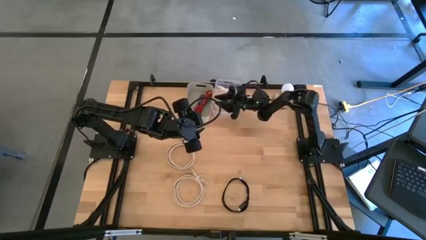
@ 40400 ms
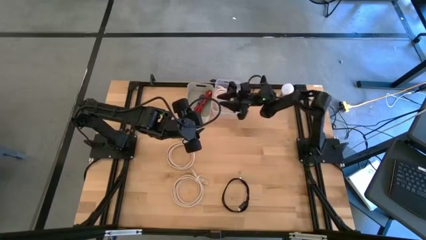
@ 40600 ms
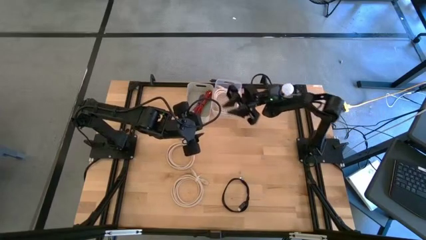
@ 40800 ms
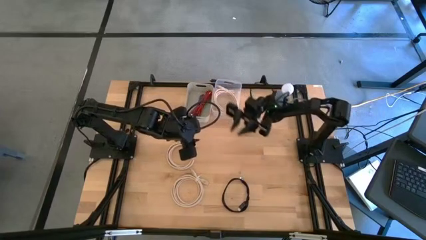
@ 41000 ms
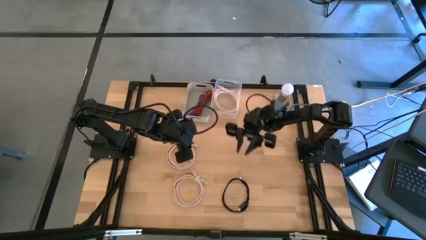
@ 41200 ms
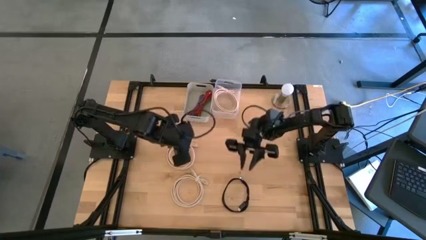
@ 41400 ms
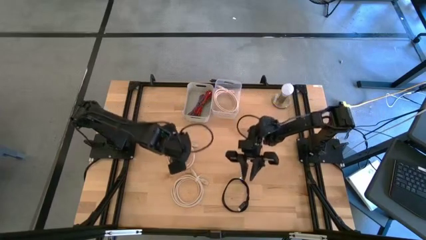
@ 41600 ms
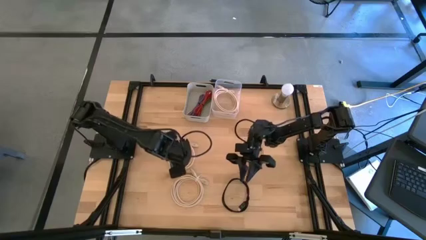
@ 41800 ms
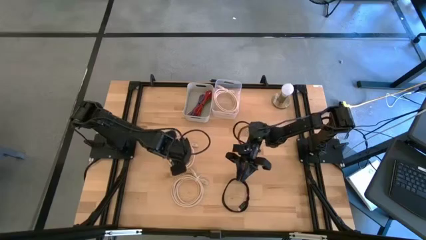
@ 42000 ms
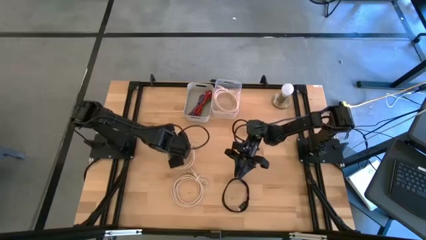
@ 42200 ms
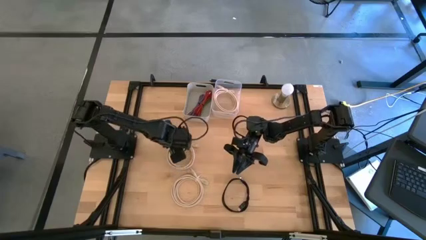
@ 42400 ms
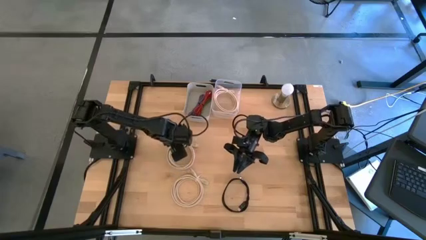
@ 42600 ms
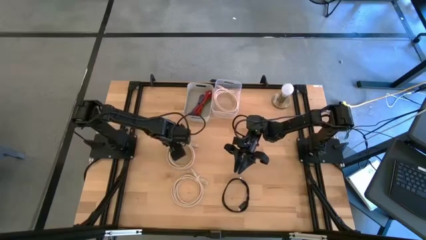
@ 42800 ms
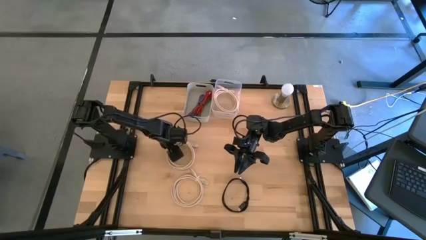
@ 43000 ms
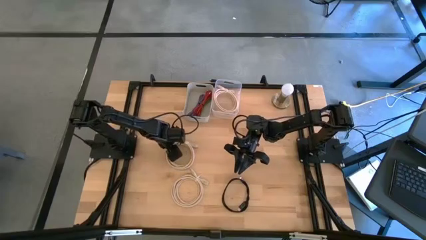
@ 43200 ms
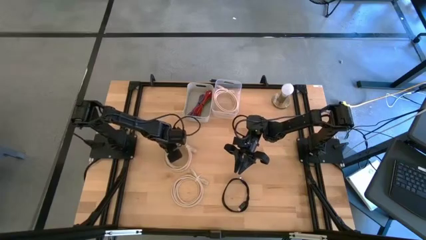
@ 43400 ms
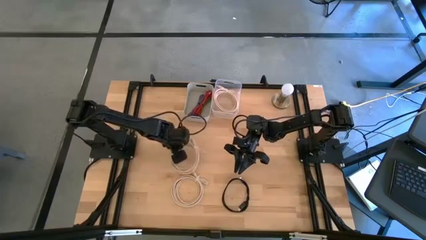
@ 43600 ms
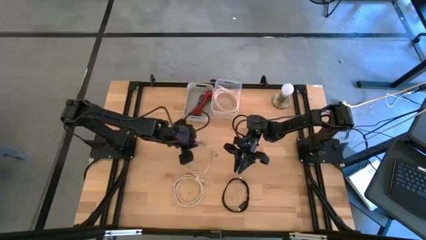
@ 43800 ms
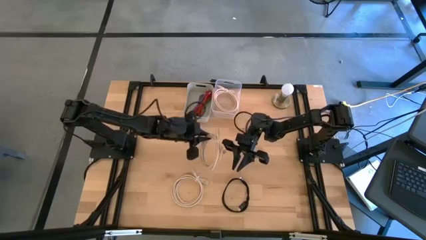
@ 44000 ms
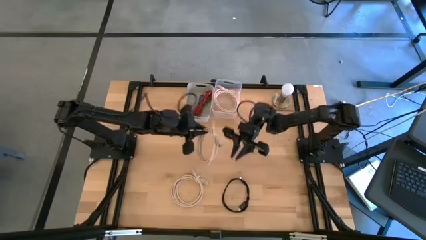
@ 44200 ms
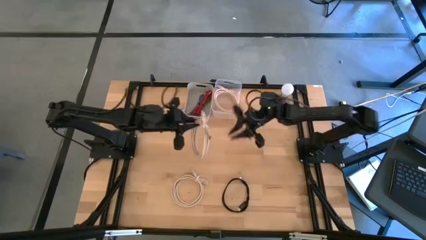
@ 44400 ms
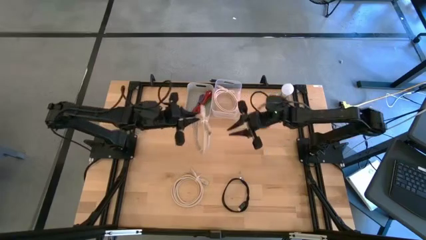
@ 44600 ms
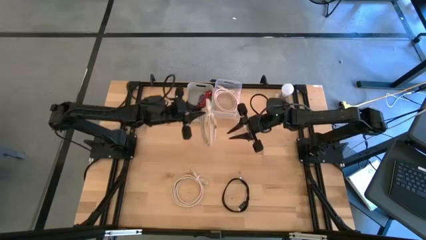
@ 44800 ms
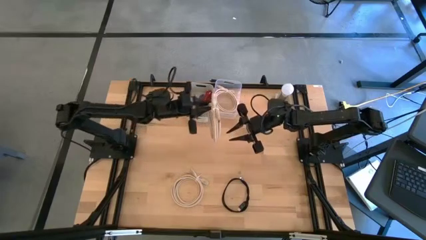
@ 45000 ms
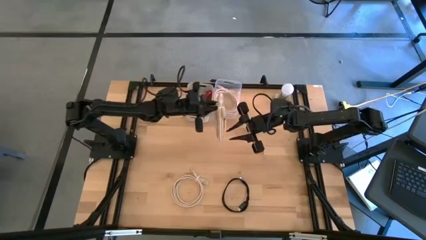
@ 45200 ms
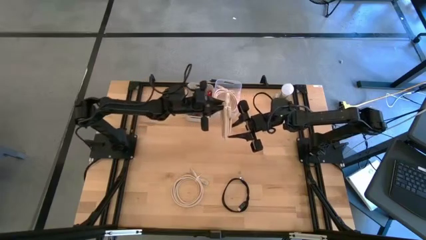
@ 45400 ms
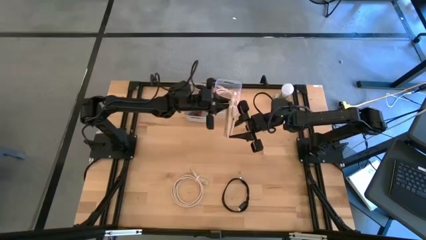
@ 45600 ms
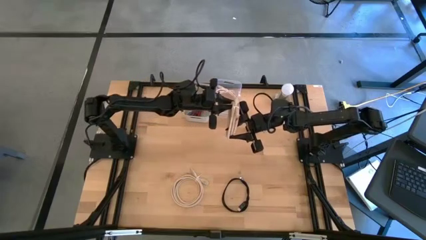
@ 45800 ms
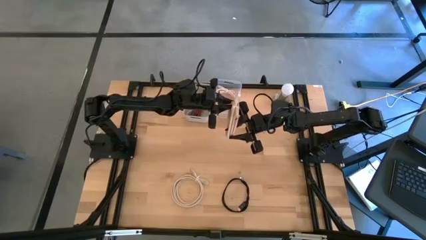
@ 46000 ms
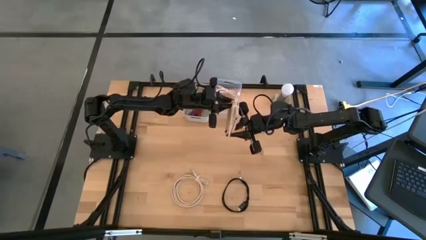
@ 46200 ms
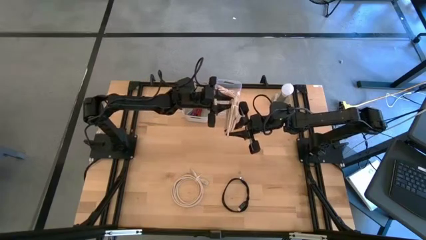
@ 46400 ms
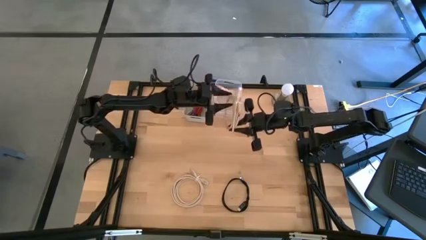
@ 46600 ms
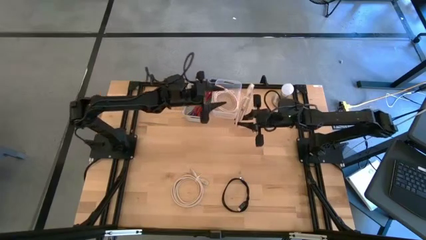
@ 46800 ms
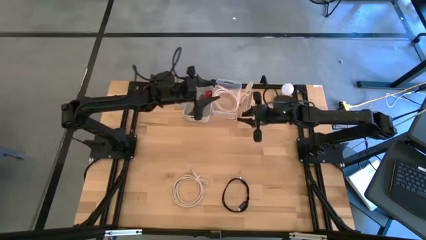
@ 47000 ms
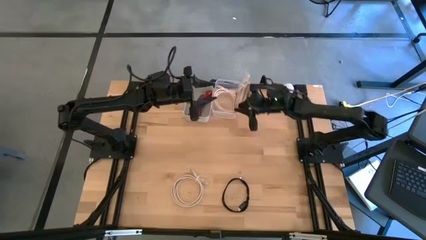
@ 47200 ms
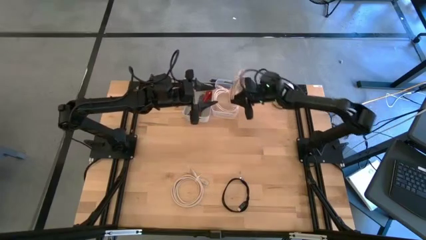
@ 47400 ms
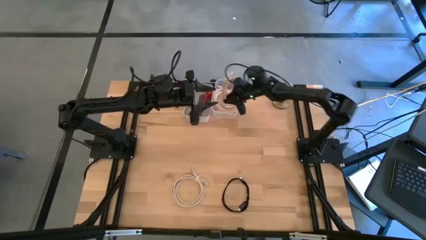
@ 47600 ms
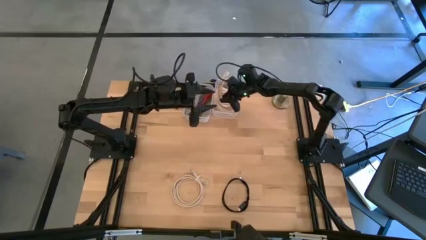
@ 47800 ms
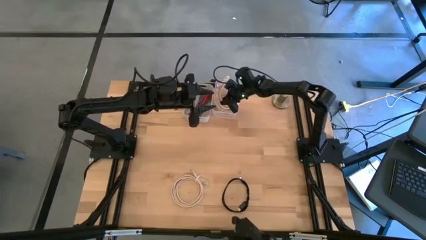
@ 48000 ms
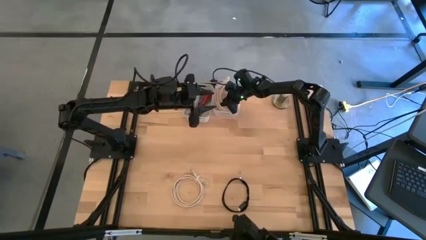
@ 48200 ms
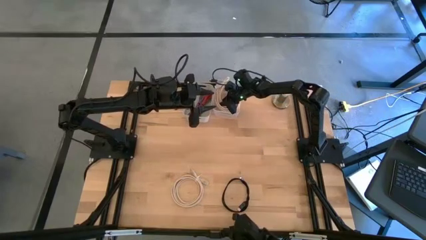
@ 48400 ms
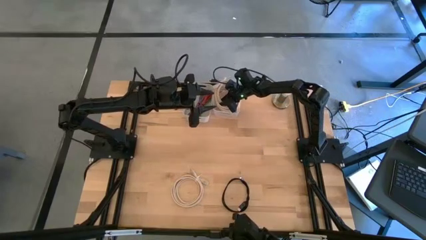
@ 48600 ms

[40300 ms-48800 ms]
Task: Pick and place USB-C Cables
Put the top gray USB cable into the transparent bin

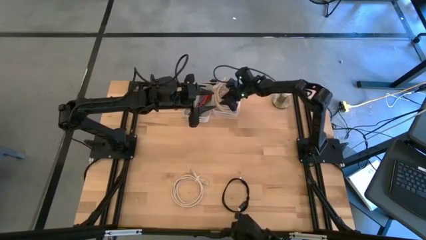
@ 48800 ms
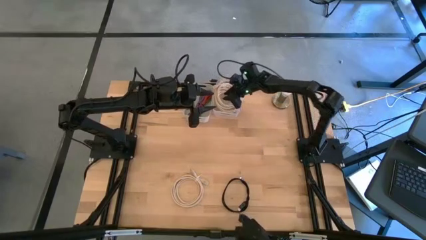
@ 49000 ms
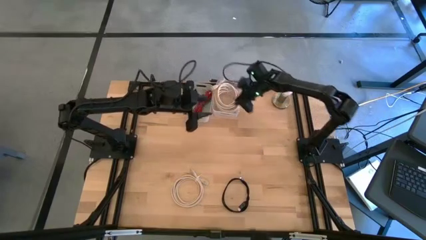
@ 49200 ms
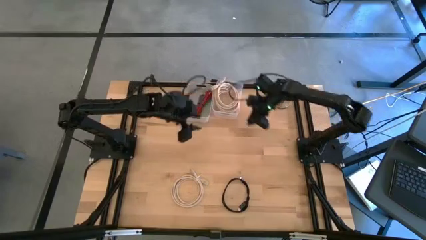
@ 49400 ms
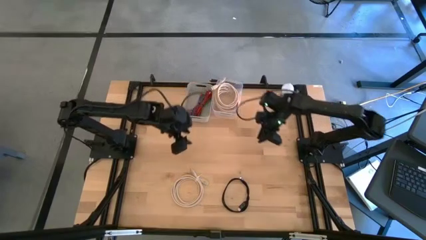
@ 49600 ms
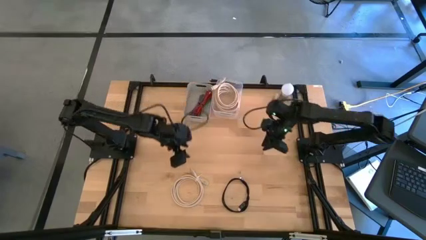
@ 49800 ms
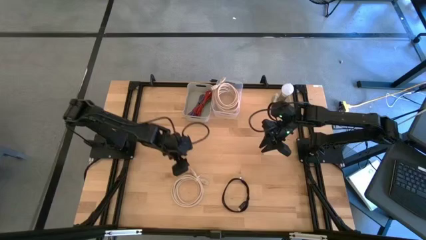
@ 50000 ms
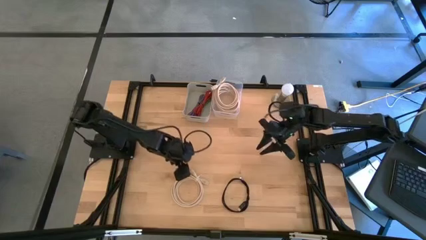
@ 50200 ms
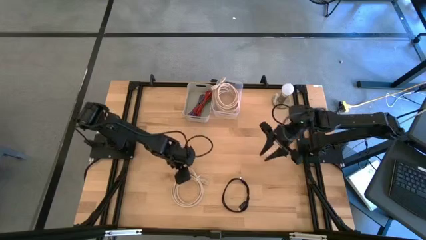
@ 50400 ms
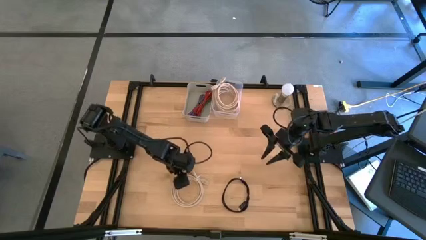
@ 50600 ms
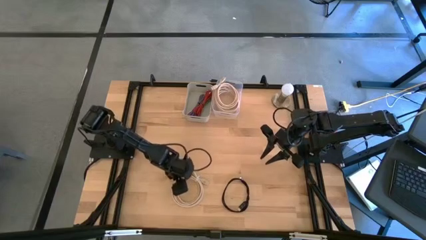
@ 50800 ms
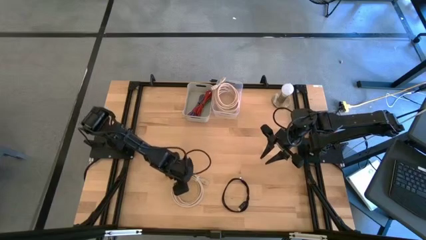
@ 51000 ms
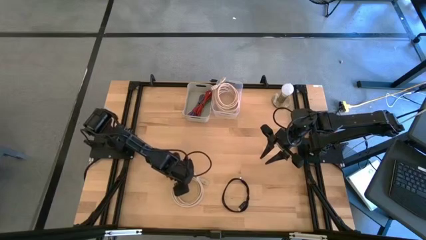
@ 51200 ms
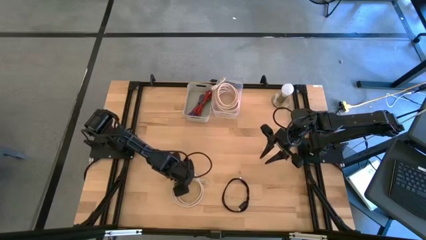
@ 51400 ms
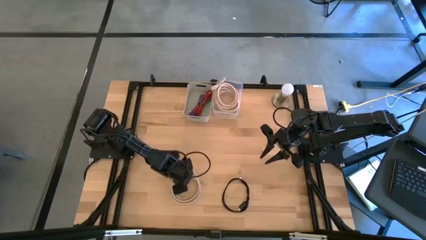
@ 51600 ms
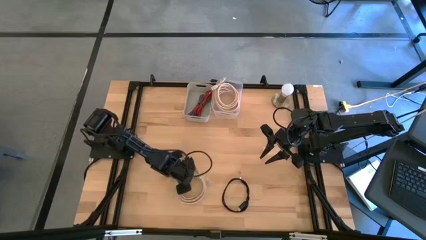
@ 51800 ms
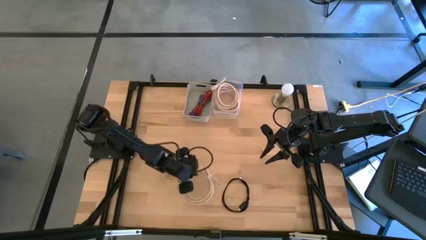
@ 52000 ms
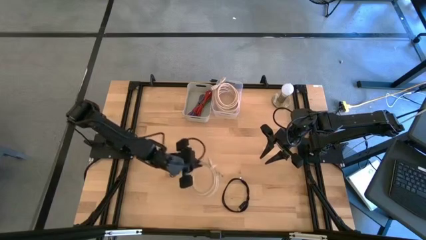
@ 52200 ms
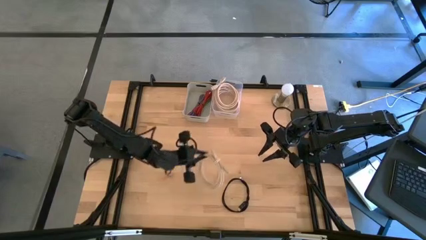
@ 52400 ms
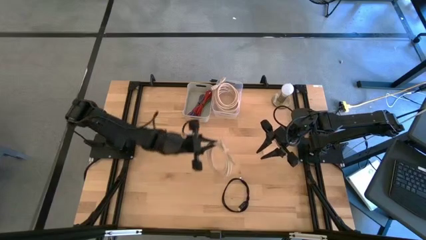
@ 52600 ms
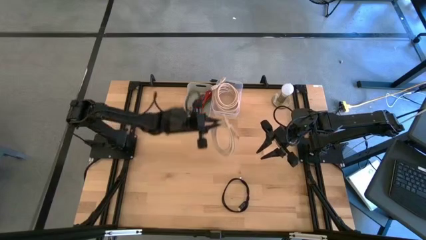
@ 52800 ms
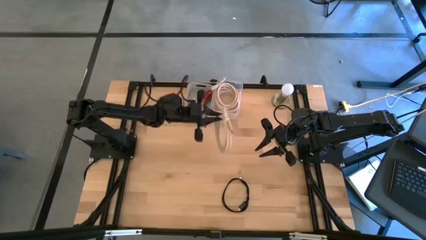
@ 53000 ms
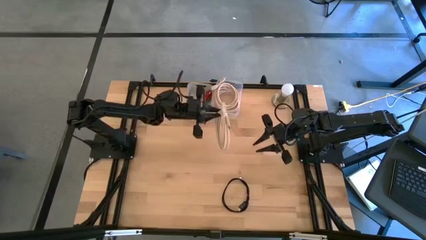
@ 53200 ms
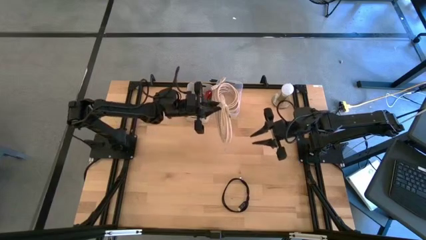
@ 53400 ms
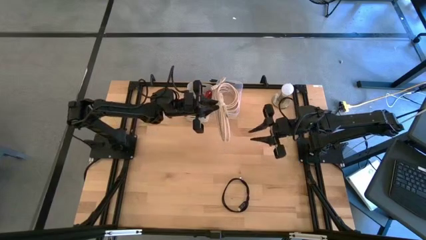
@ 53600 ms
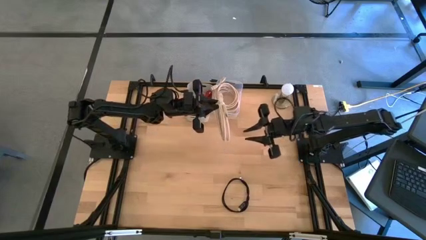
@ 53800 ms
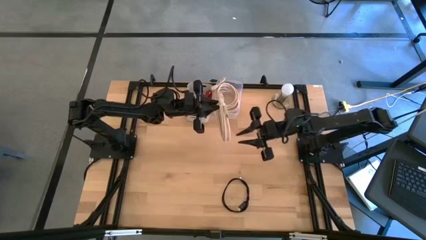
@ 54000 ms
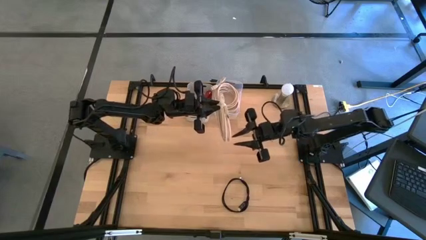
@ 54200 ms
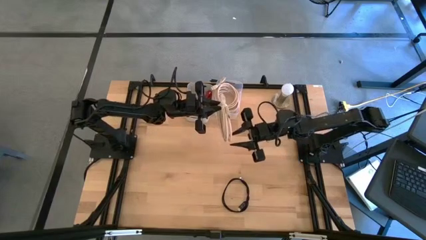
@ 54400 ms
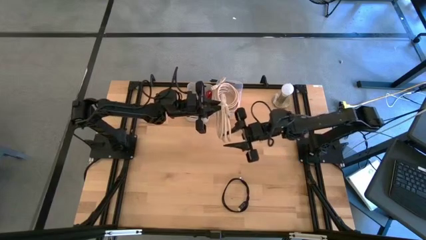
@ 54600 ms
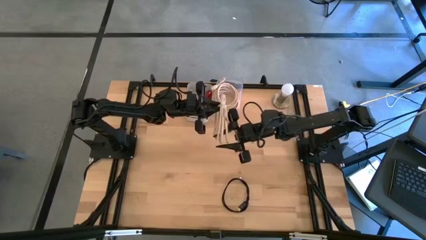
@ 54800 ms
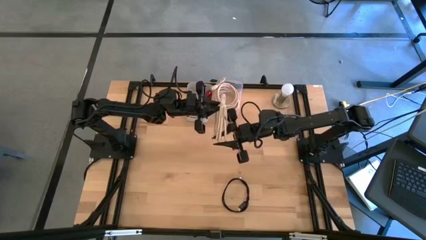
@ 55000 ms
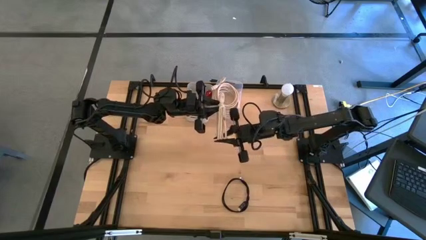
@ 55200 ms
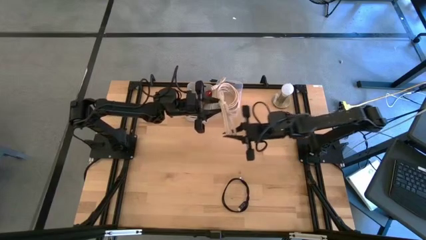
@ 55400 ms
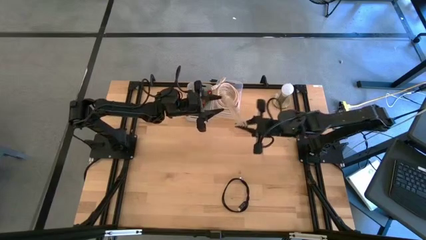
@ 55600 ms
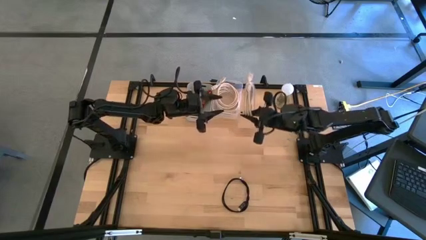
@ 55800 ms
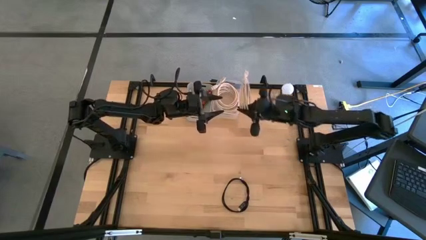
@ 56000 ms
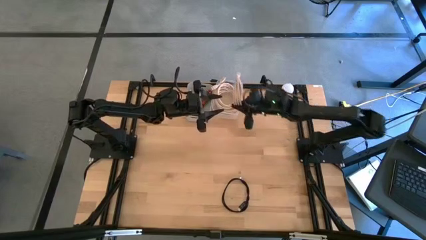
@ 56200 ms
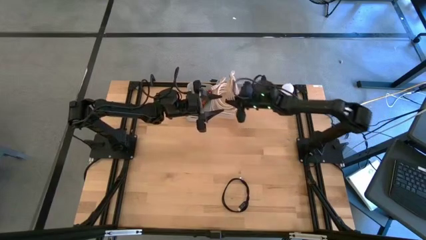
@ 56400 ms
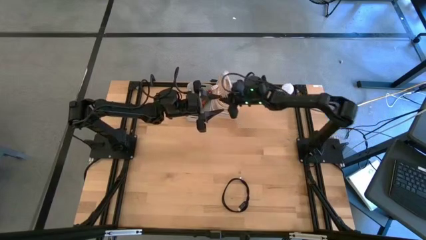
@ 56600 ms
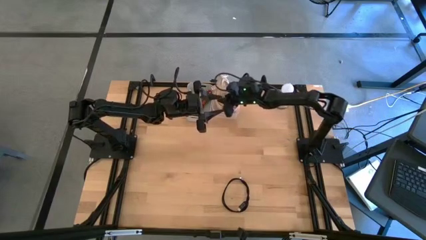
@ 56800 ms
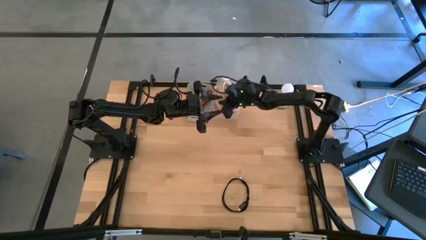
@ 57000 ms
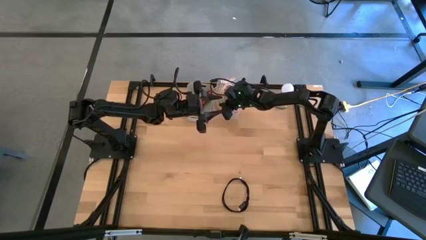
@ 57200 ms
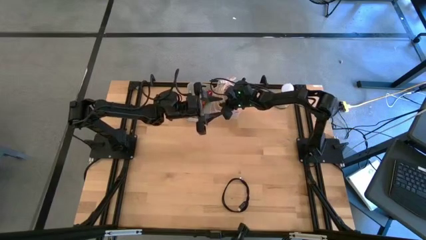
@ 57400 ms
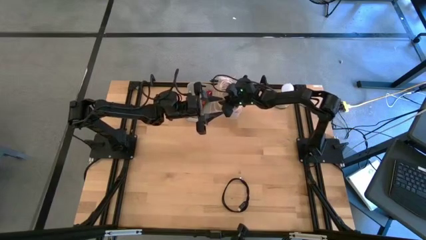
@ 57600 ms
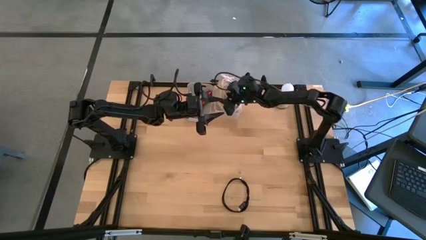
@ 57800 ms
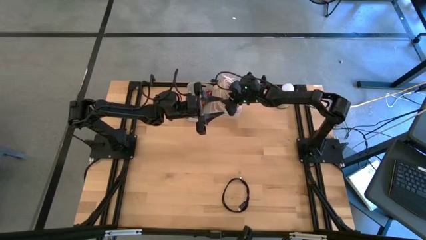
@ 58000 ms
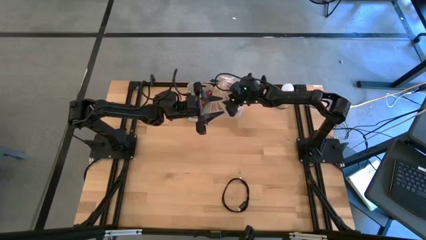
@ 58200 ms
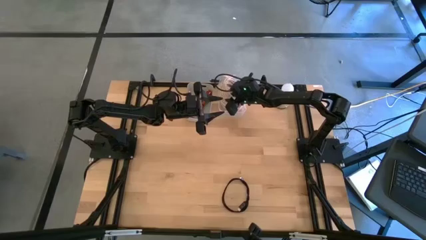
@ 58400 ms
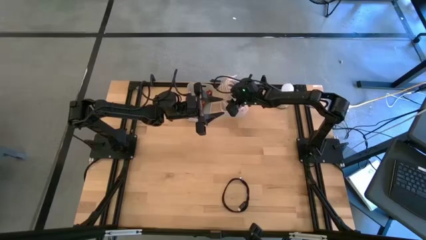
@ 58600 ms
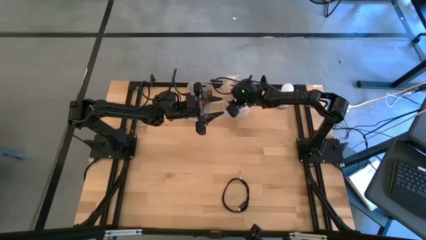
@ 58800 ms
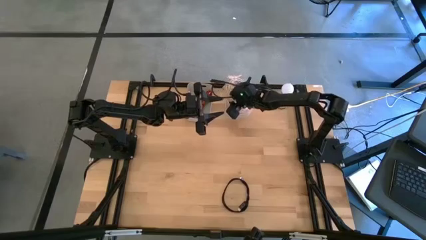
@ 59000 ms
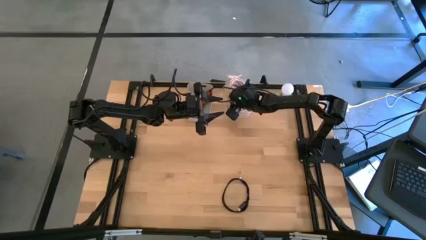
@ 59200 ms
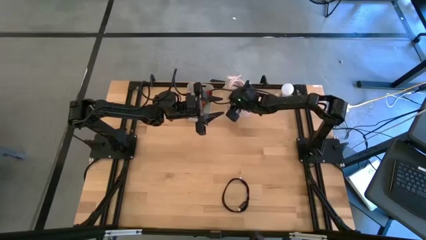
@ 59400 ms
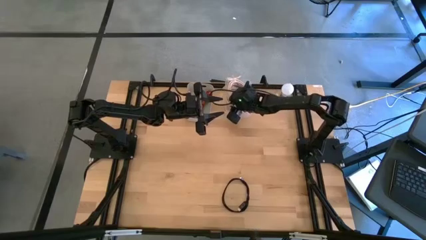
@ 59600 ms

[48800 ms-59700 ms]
Put the gray USB cable into the transparent bin
